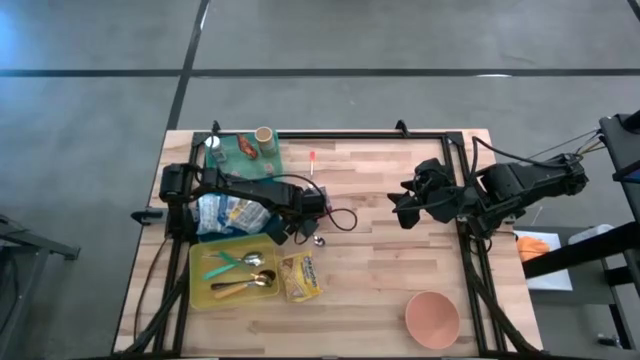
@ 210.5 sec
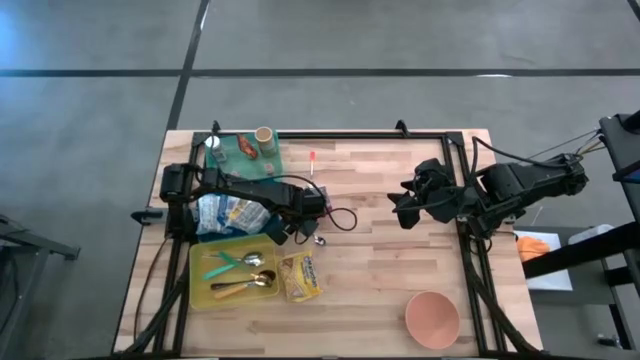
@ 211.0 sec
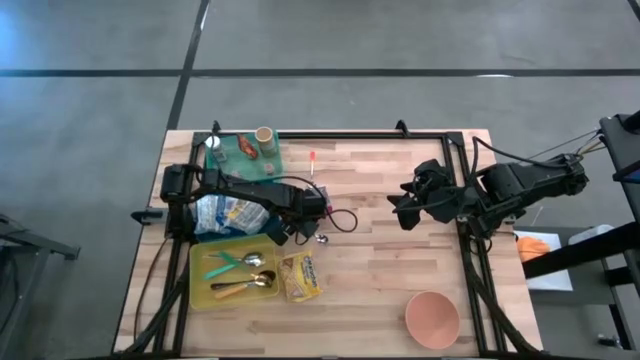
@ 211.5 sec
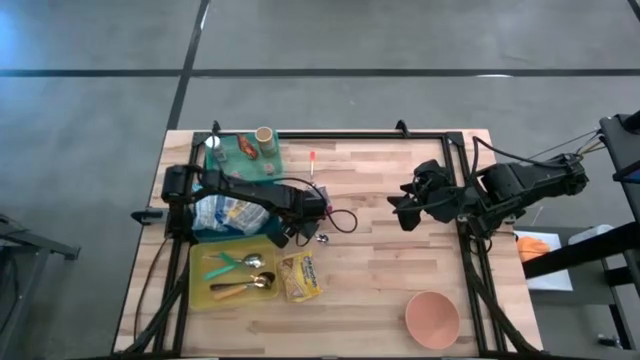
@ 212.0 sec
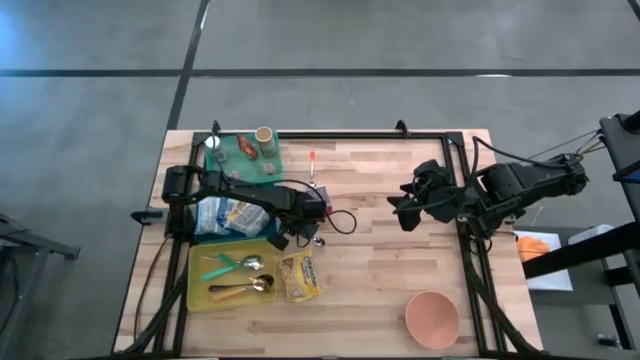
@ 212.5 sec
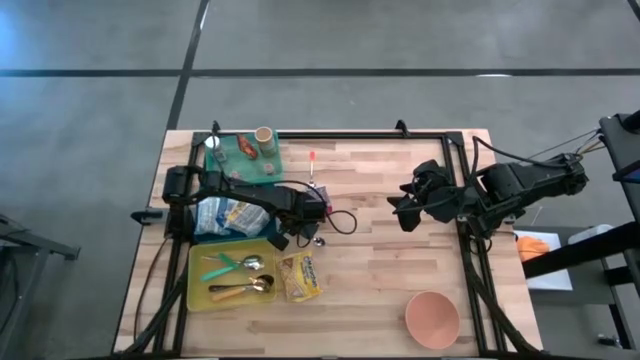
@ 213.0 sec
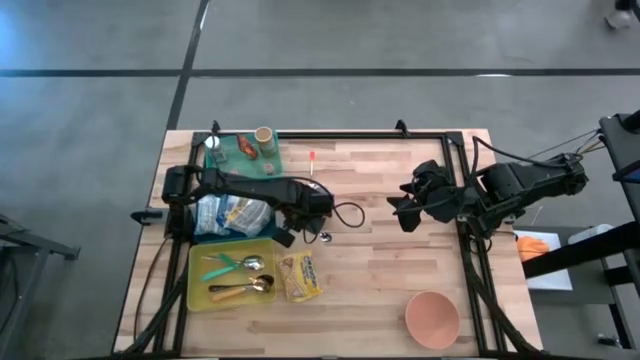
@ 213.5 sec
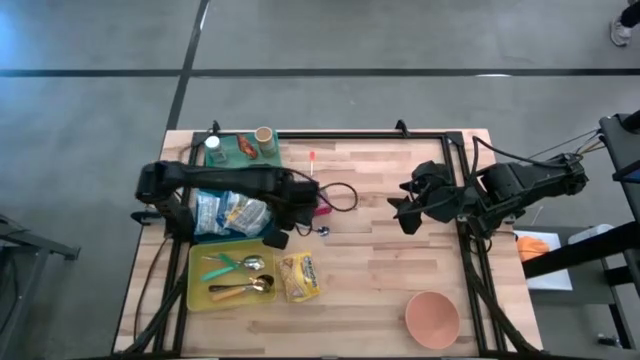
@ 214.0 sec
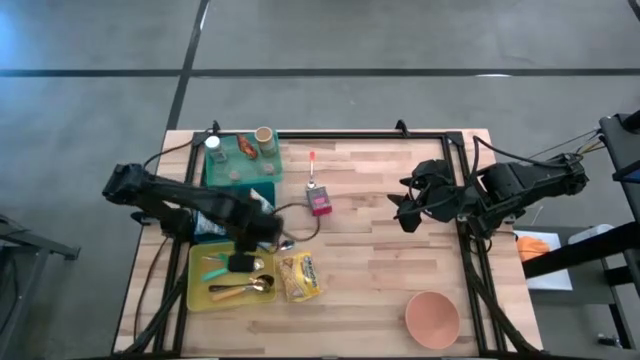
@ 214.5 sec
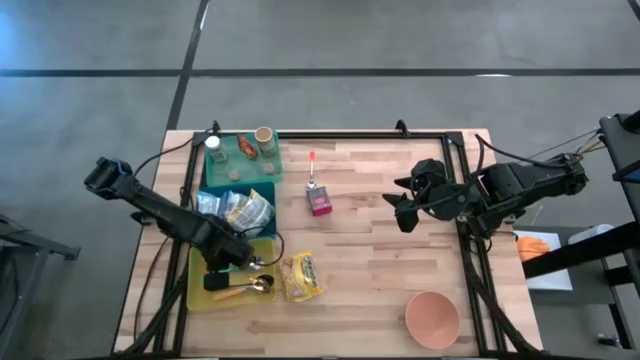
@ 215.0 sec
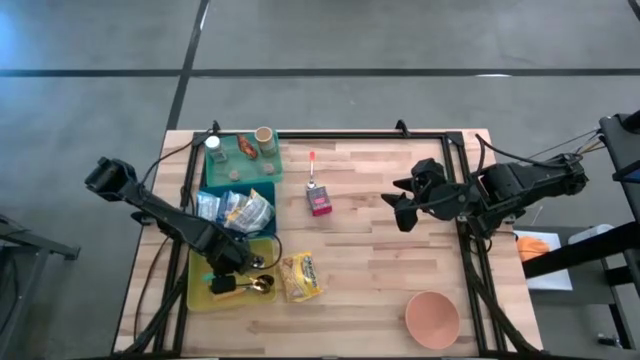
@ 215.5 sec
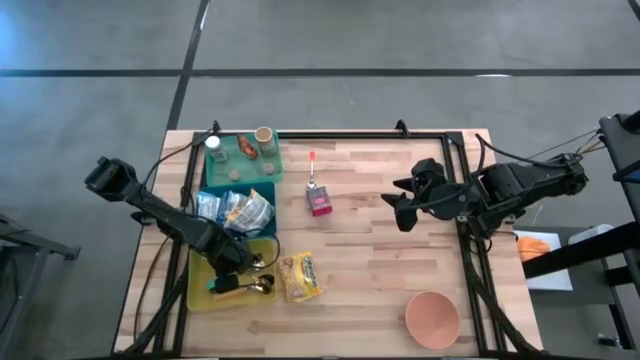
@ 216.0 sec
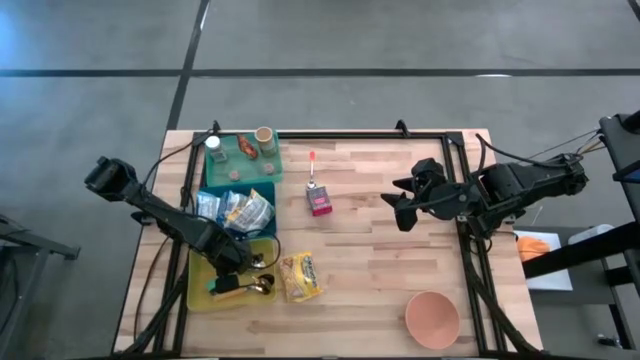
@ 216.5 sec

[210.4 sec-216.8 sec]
Put the light blue spoon into the yellow bin

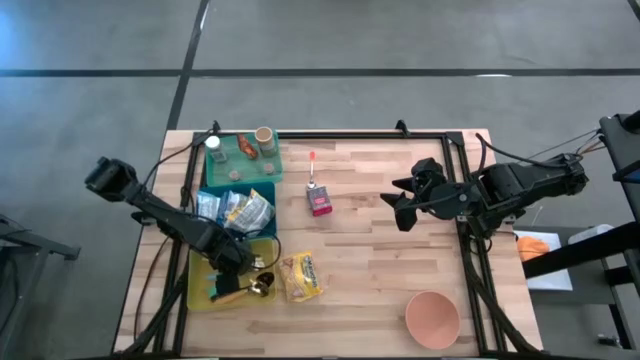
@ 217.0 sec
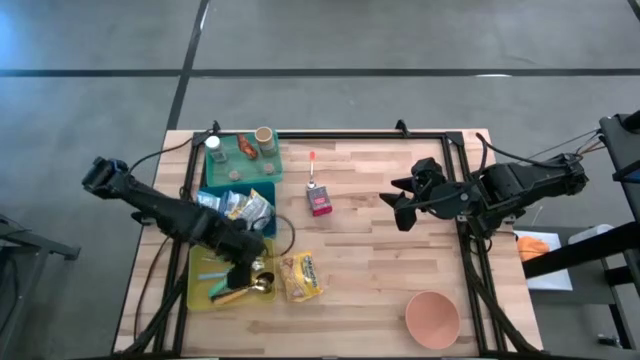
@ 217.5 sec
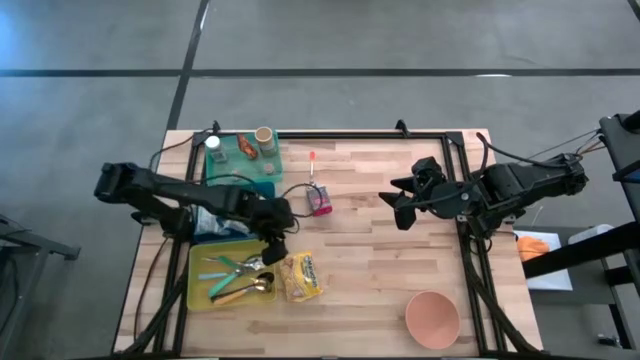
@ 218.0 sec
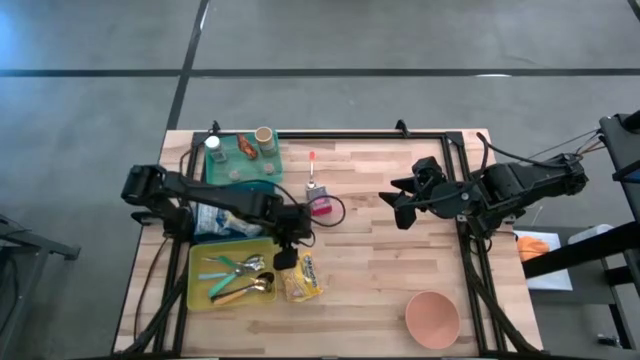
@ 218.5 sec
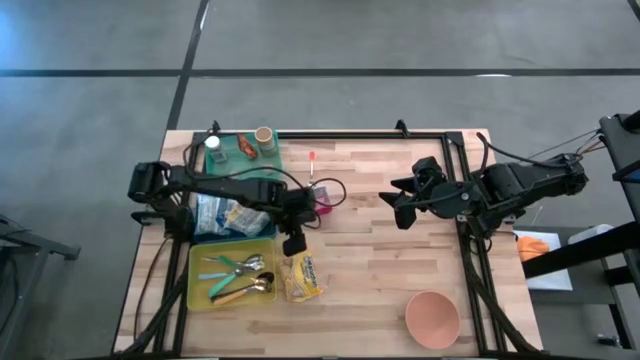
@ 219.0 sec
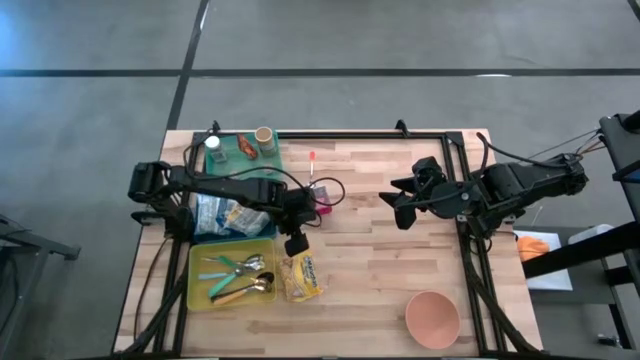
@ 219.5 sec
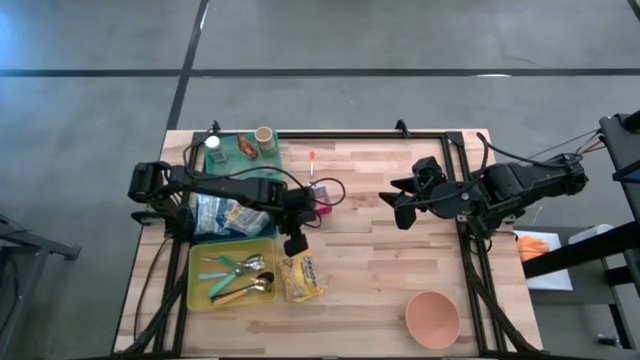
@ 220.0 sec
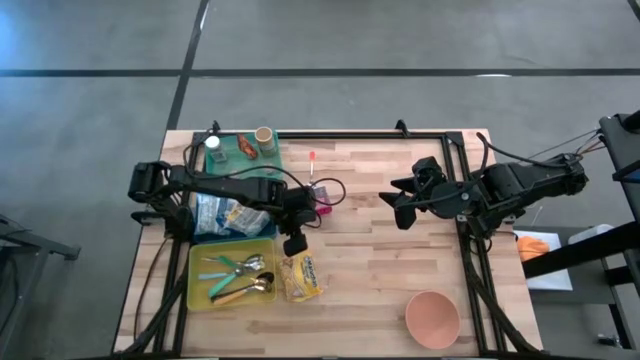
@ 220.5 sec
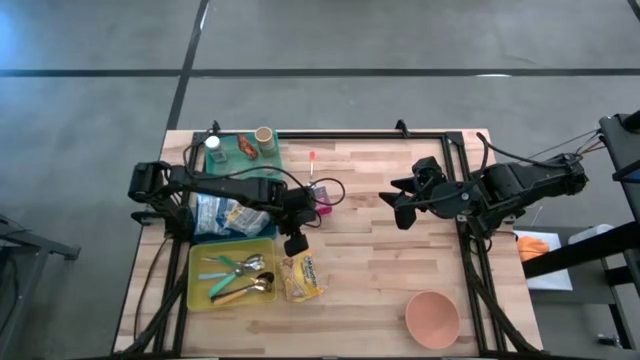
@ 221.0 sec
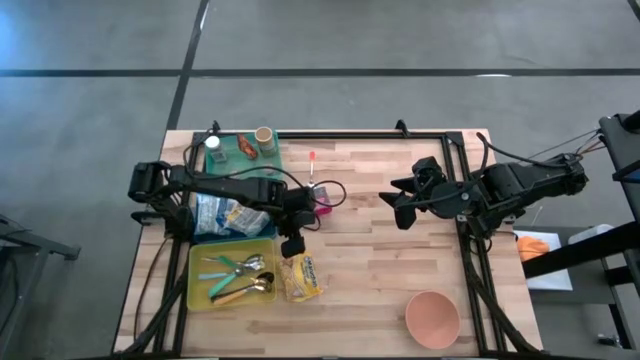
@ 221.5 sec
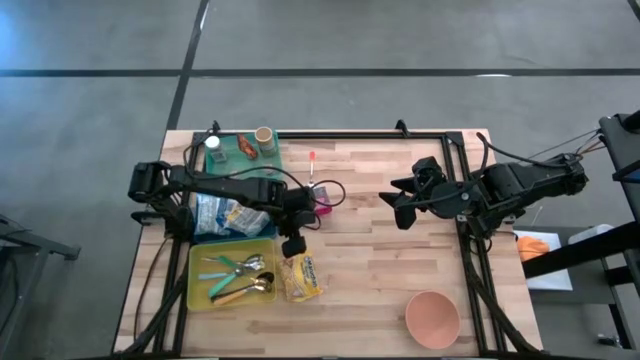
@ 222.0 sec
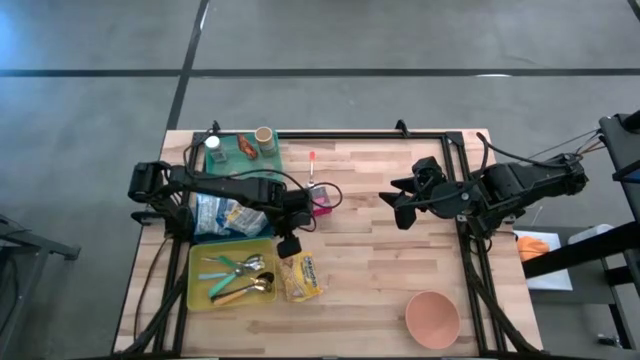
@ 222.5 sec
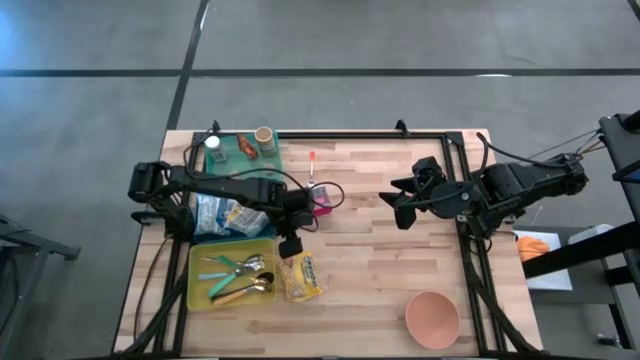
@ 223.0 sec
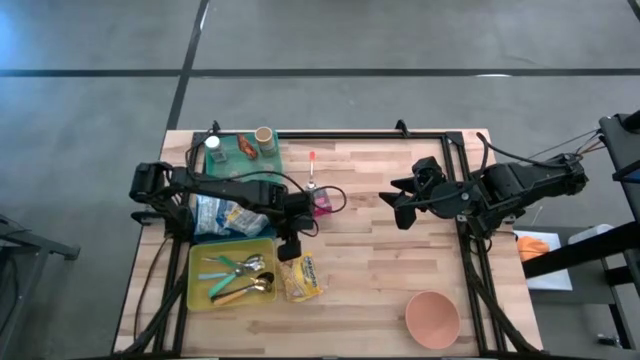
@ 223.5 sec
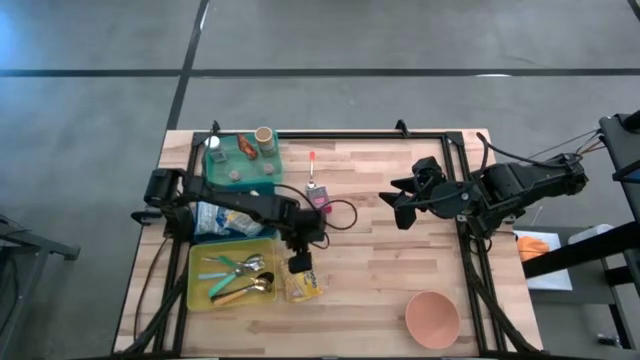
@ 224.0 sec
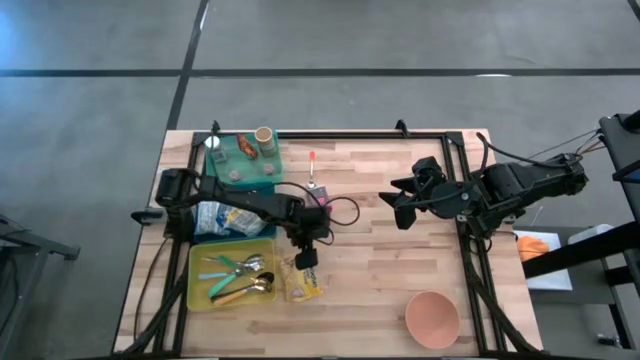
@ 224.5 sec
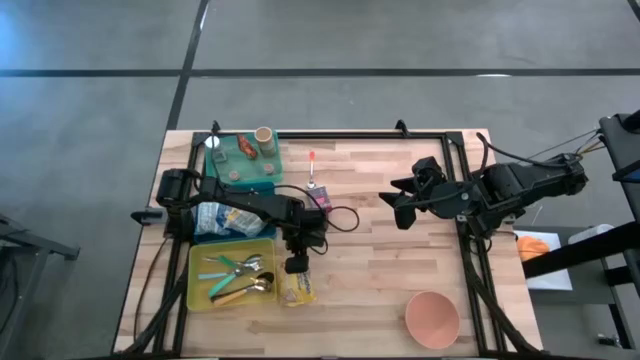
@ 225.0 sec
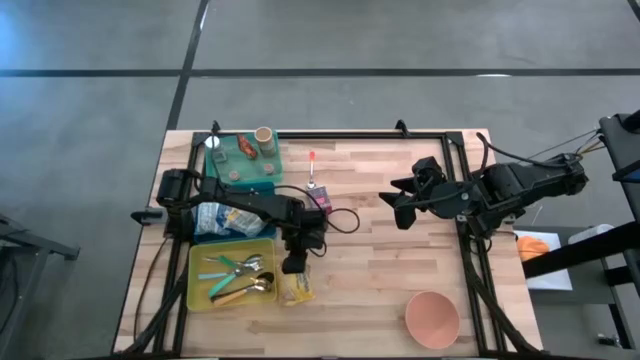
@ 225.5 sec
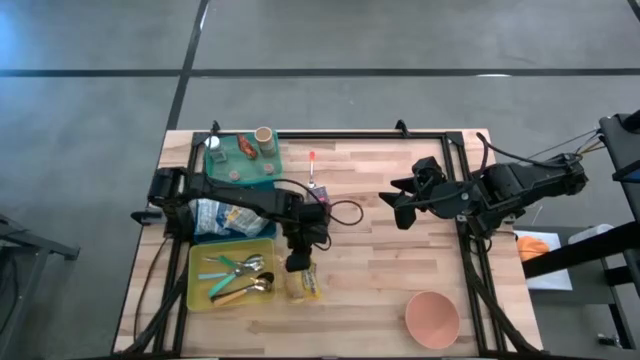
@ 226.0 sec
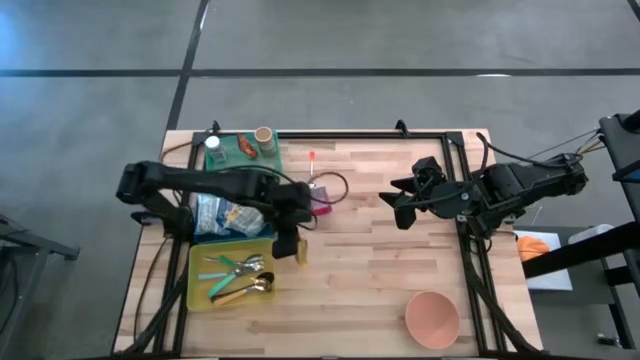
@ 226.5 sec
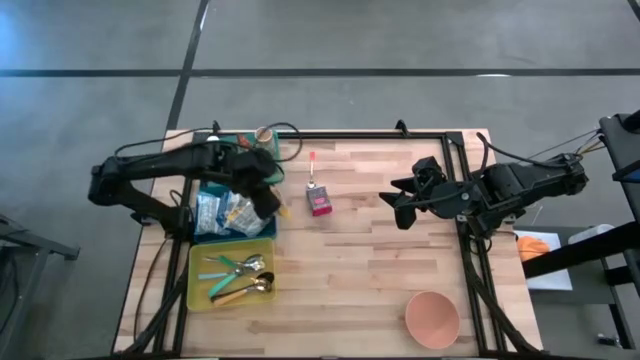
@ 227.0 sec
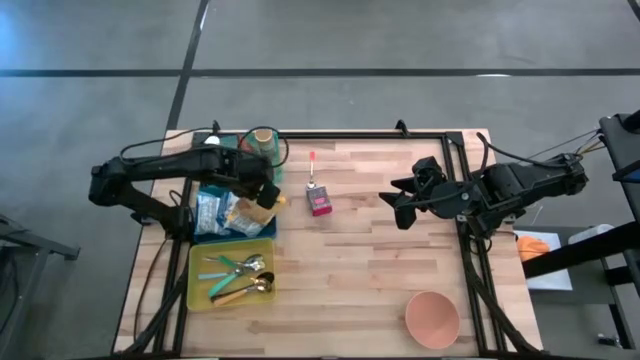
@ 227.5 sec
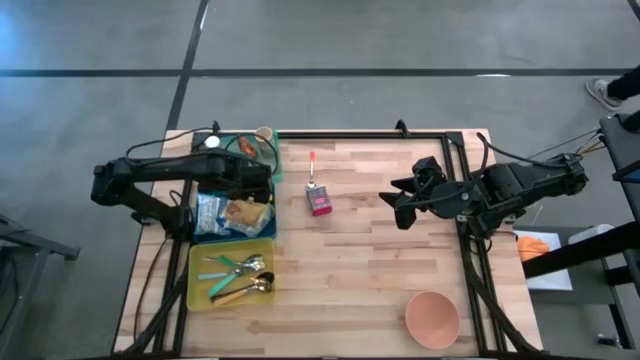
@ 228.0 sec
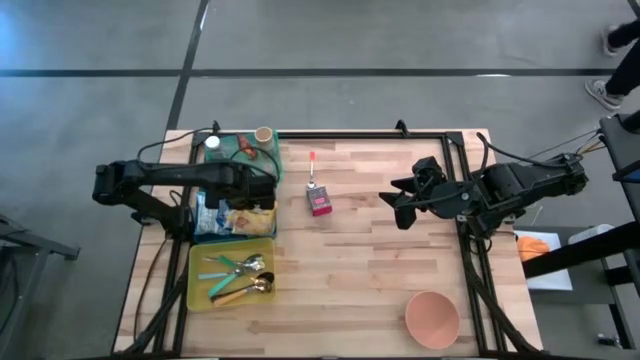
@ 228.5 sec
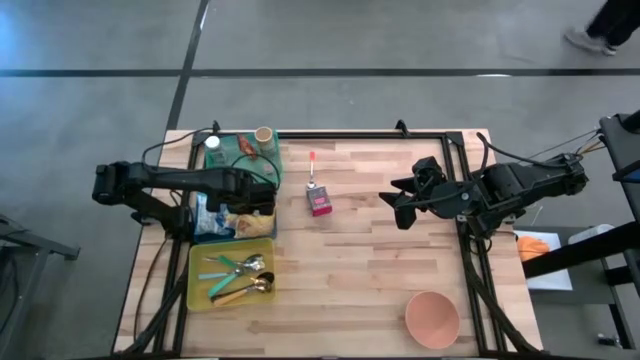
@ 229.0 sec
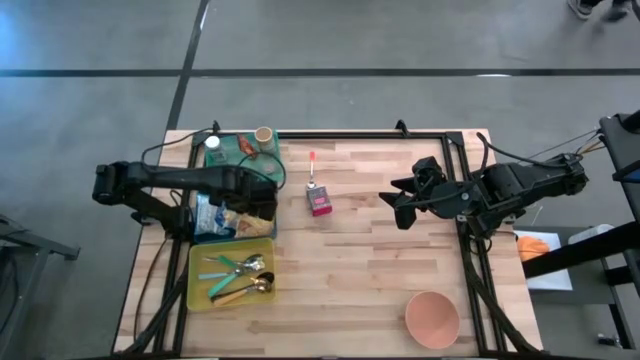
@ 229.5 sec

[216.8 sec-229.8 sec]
Put the yellow noodle pack into the dark blue bin
